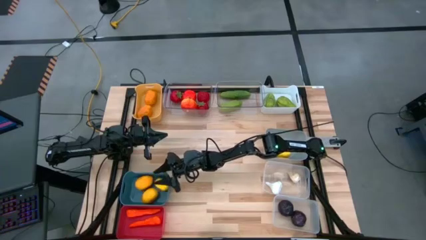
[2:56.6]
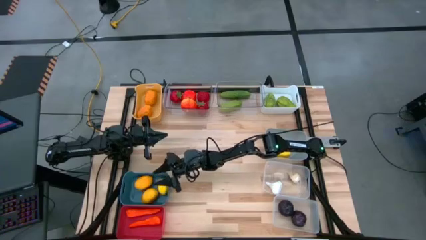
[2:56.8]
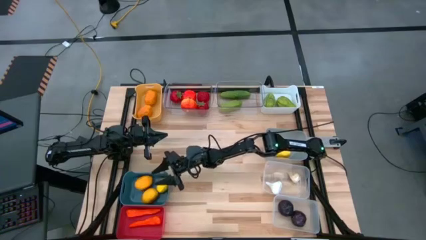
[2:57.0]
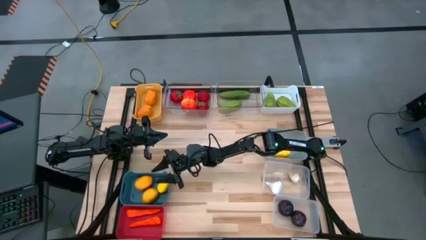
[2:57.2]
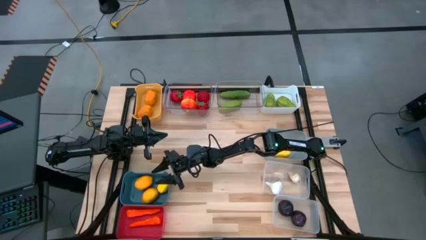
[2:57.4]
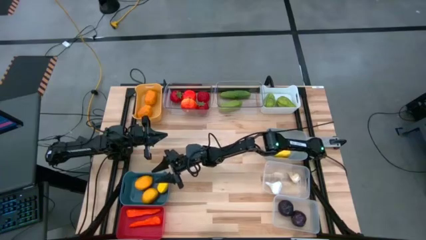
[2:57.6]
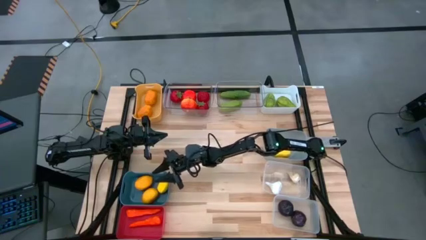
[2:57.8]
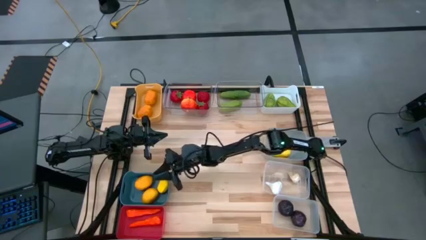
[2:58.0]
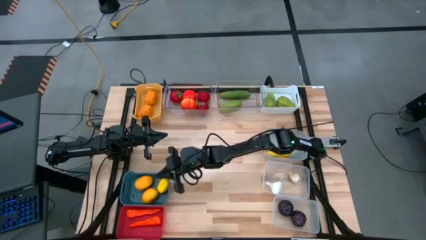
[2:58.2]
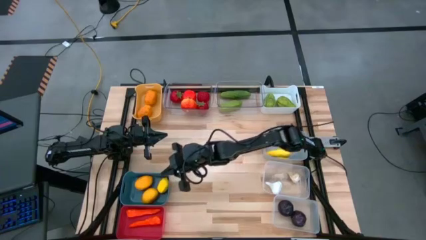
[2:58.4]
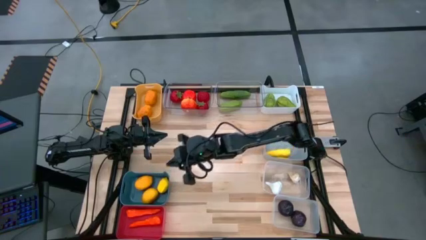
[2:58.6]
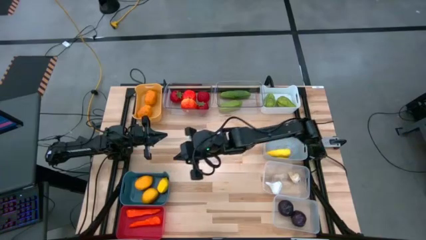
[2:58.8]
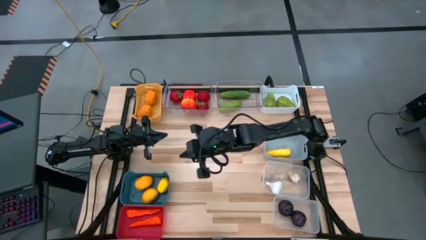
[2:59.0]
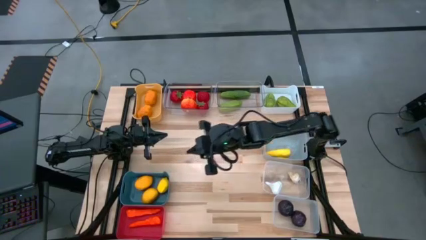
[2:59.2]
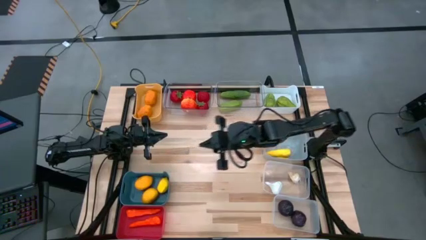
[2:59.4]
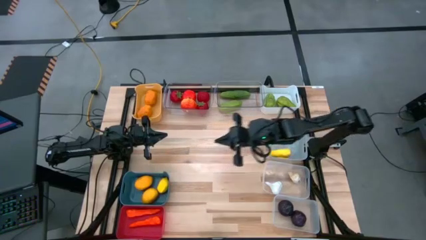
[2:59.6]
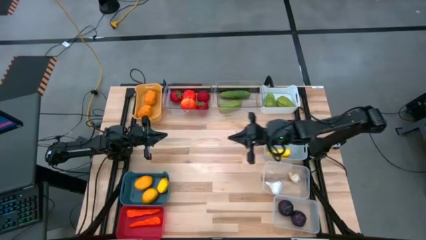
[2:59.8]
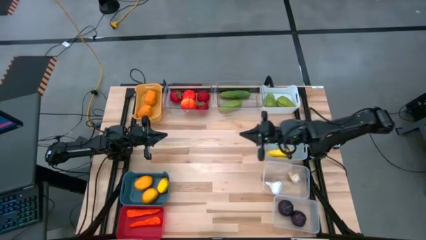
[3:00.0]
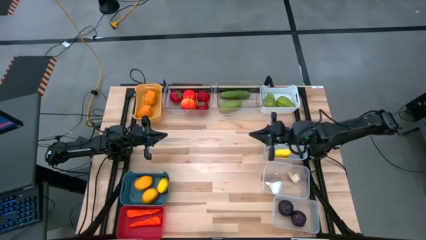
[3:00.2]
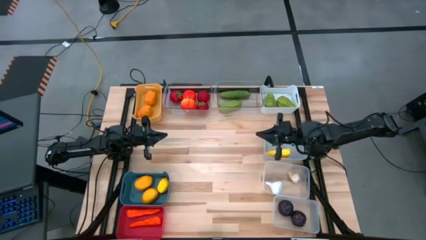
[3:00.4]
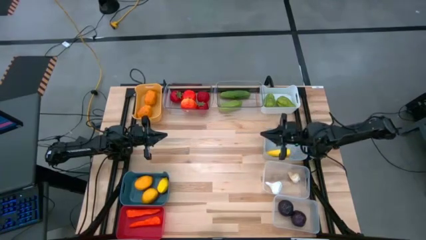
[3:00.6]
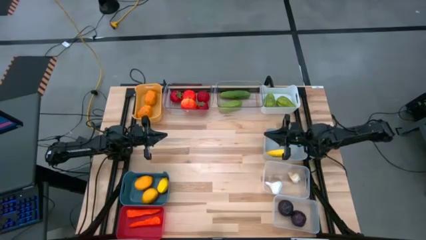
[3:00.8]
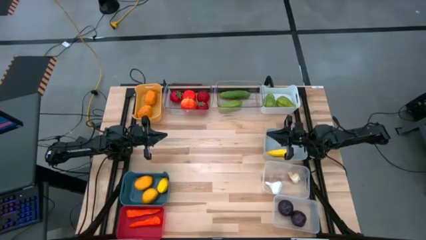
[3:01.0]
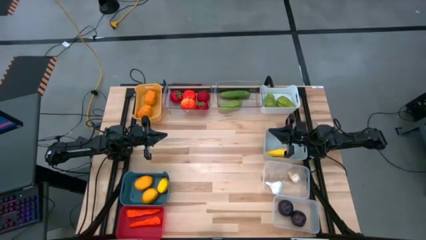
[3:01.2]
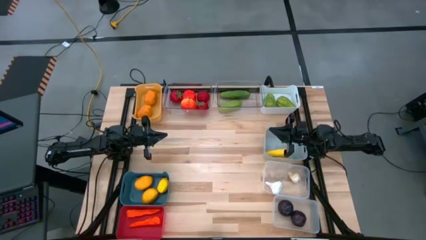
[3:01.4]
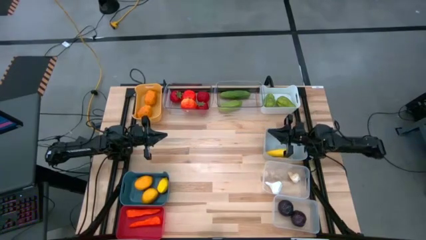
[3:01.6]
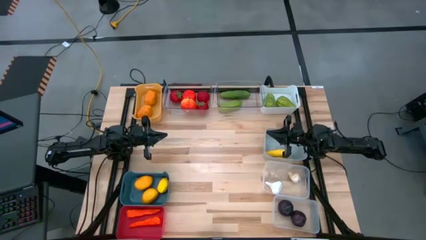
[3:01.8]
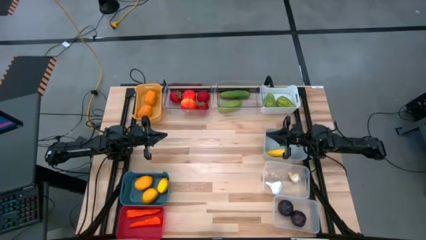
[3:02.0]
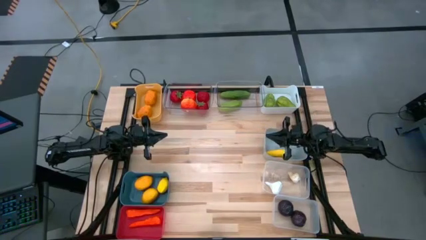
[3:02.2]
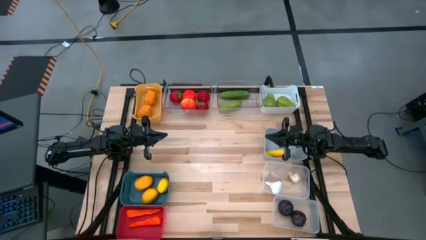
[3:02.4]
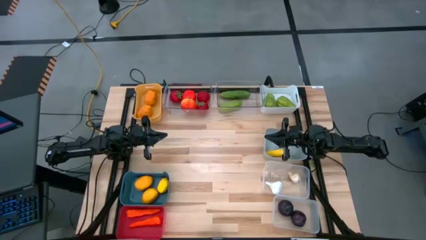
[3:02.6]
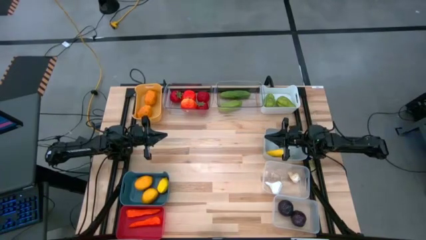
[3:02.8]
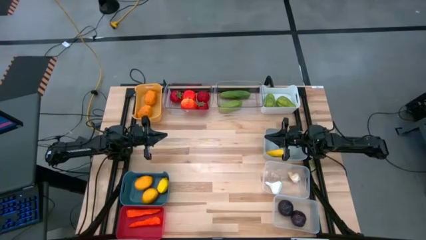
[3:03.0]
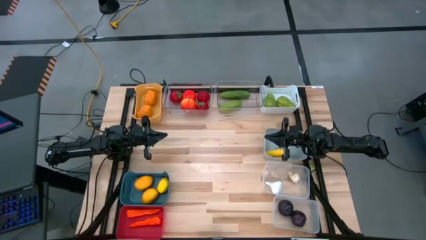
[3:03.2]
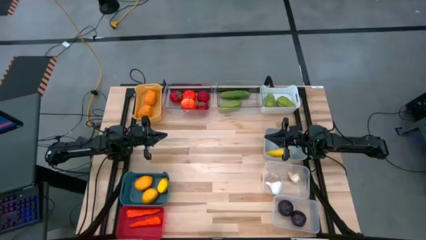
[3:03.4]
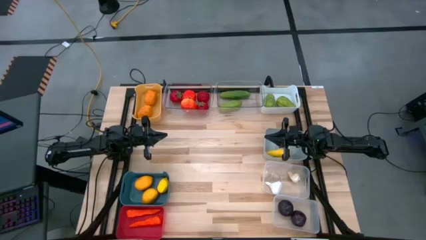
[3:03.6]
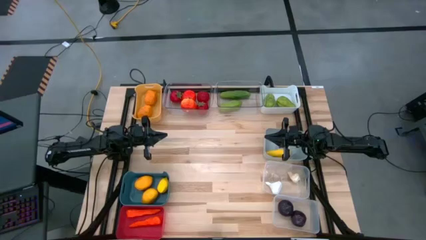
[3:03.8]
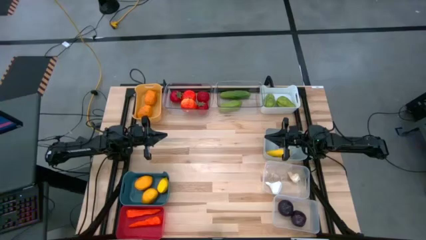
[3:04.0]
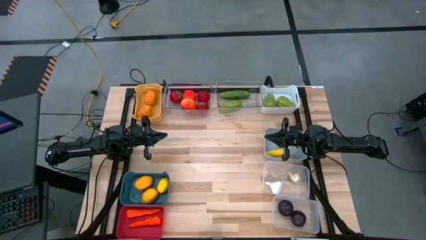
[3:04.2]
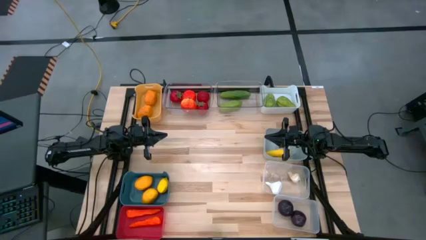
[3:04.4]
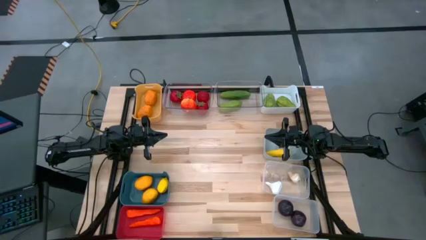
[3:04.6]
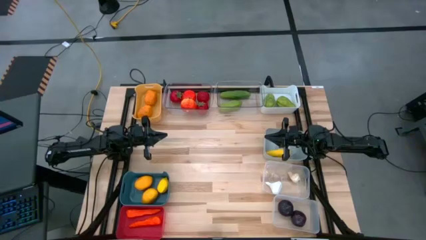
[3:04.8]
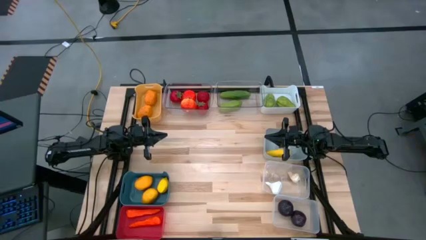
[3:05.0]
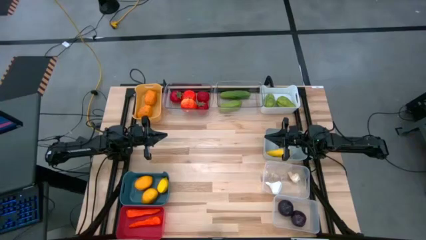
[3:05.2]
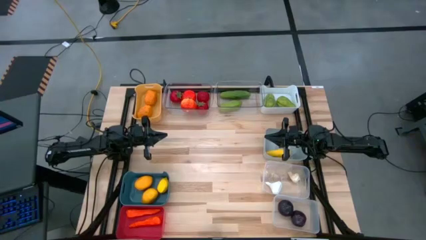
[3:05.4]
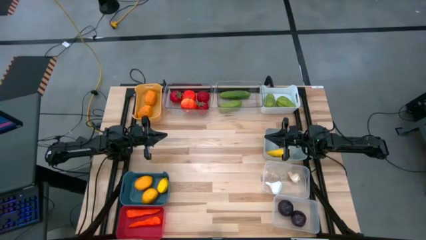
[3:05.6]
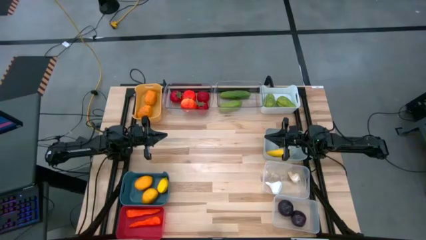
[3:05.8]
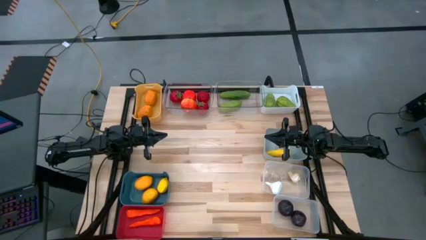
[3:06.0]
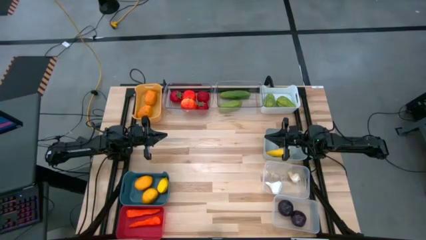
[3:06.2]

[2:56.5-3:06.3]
Task: Sort produce into baskets
Return to Home Position
